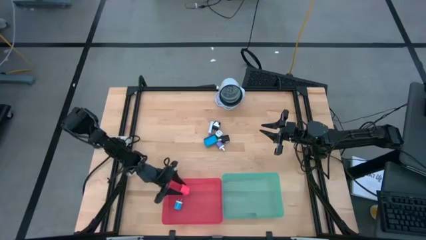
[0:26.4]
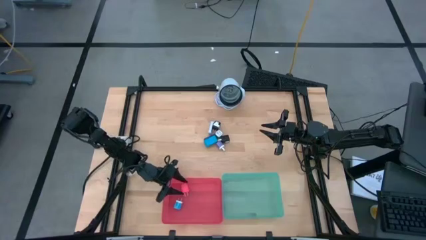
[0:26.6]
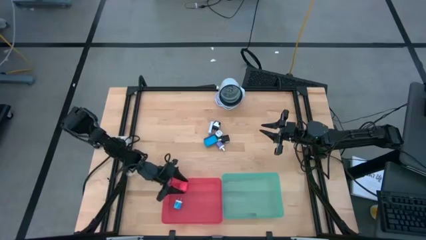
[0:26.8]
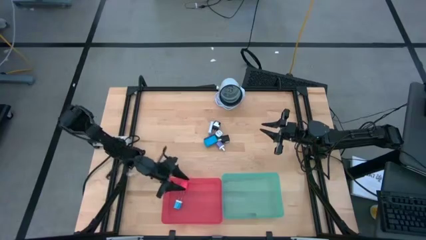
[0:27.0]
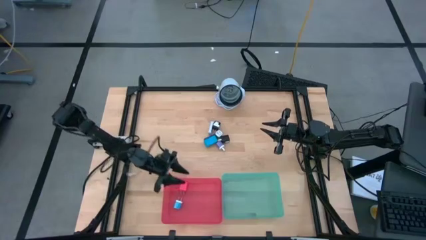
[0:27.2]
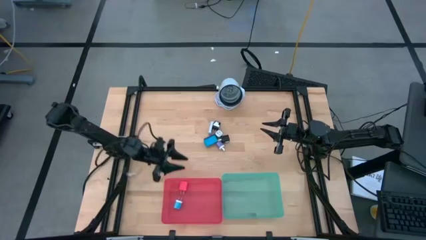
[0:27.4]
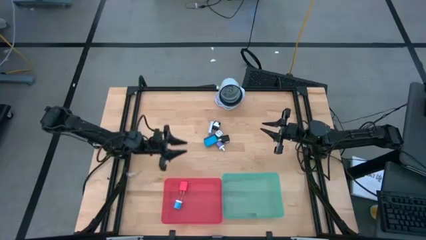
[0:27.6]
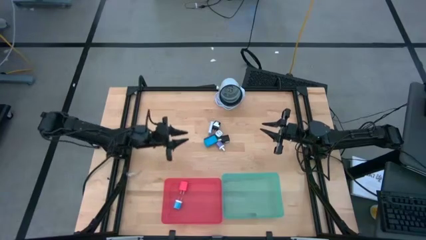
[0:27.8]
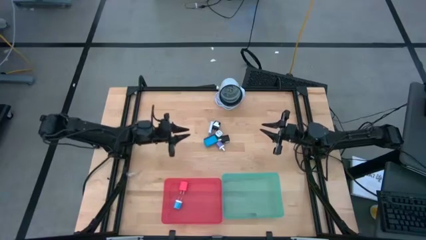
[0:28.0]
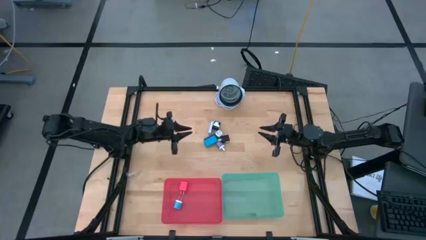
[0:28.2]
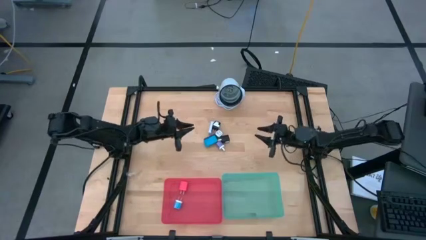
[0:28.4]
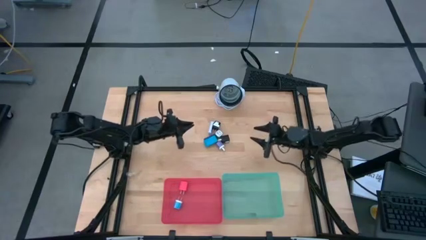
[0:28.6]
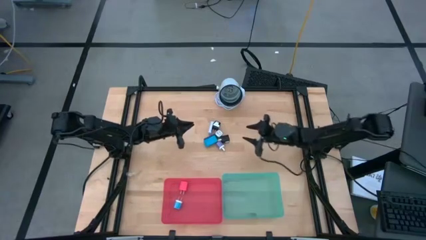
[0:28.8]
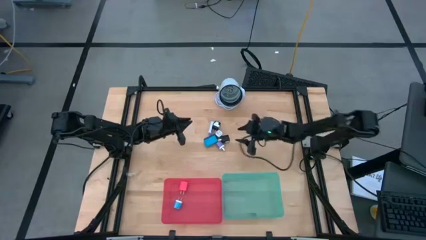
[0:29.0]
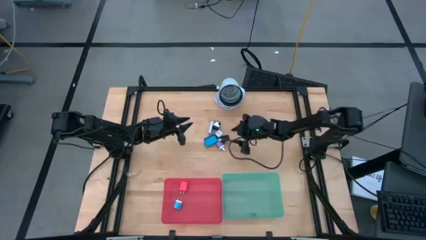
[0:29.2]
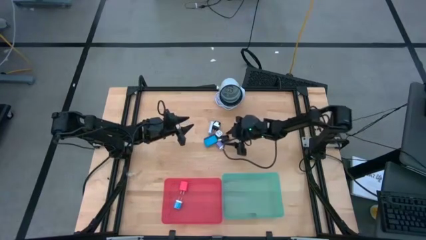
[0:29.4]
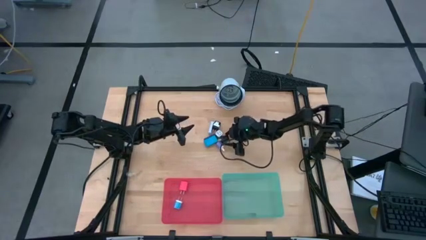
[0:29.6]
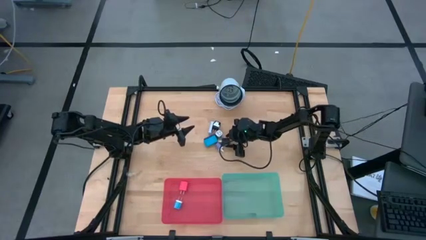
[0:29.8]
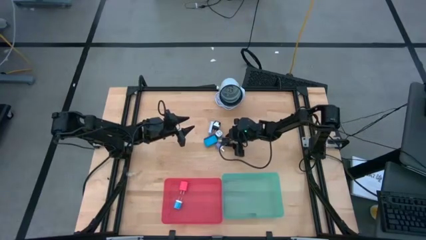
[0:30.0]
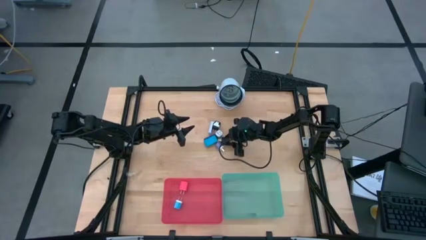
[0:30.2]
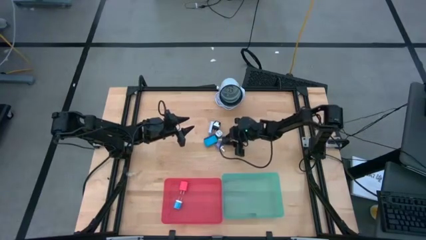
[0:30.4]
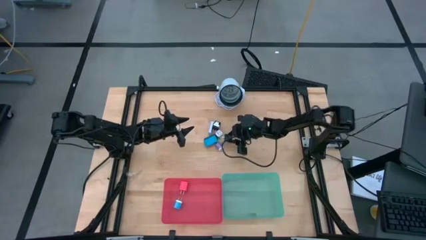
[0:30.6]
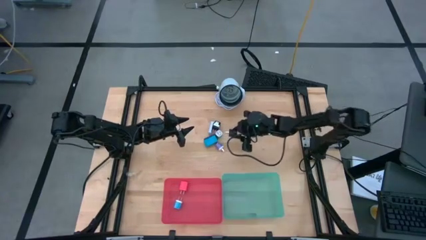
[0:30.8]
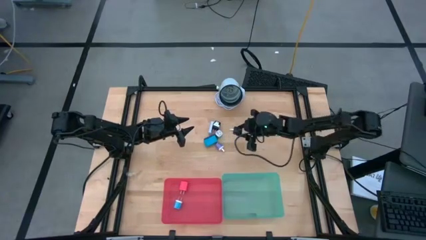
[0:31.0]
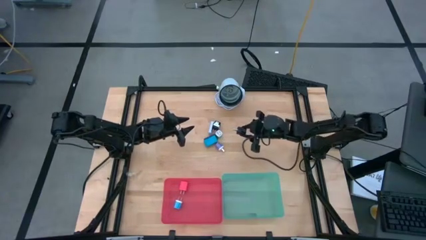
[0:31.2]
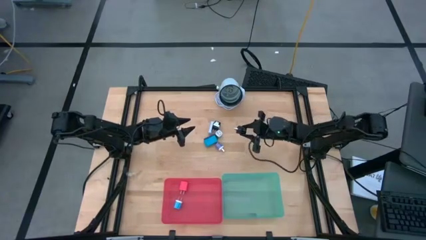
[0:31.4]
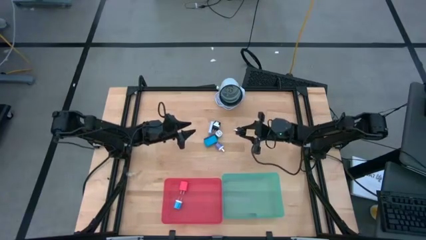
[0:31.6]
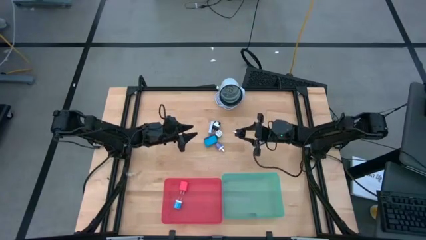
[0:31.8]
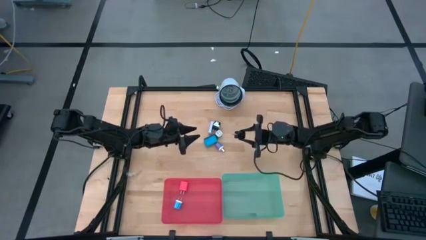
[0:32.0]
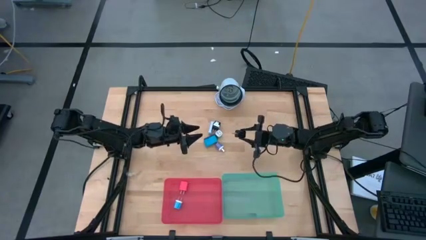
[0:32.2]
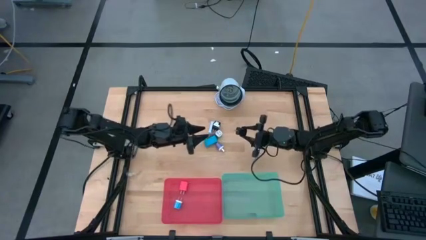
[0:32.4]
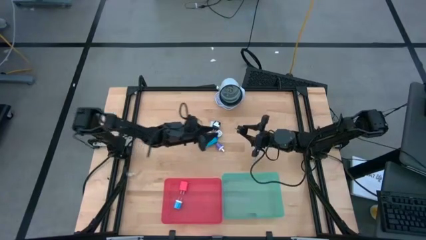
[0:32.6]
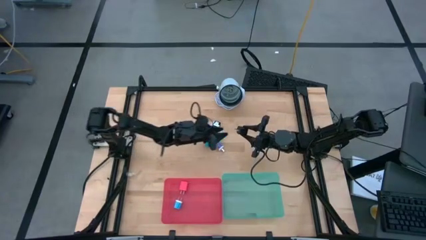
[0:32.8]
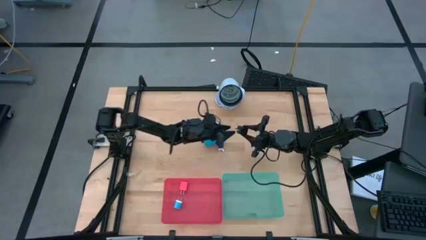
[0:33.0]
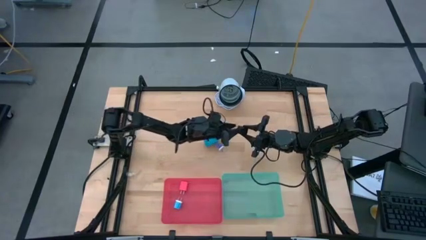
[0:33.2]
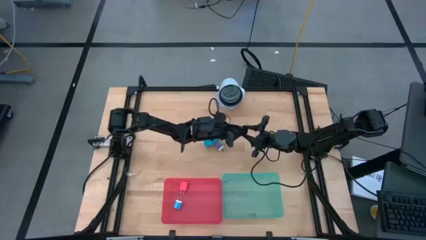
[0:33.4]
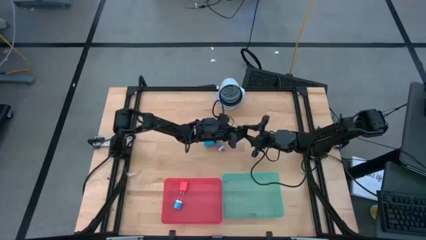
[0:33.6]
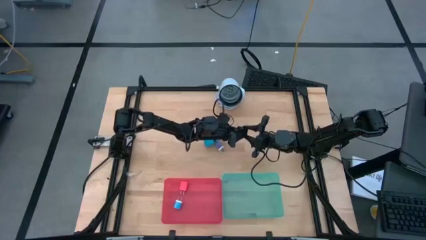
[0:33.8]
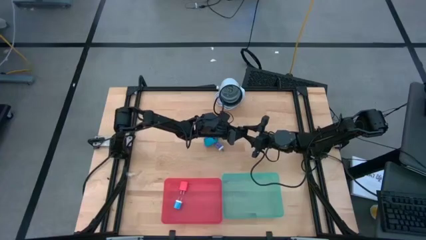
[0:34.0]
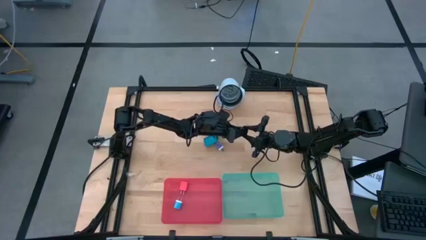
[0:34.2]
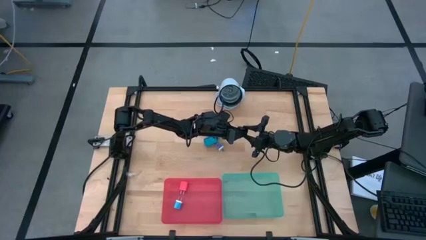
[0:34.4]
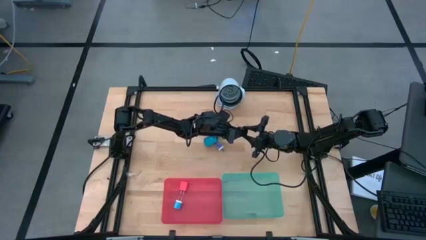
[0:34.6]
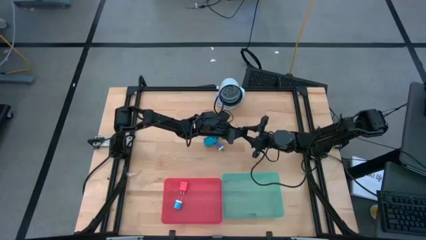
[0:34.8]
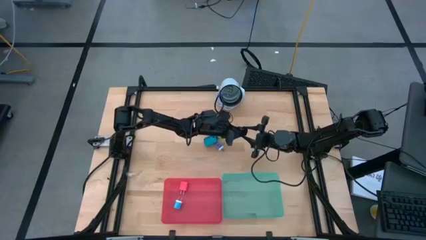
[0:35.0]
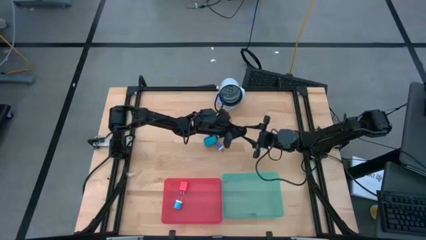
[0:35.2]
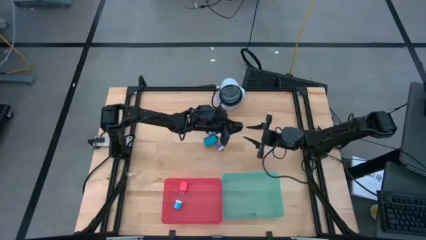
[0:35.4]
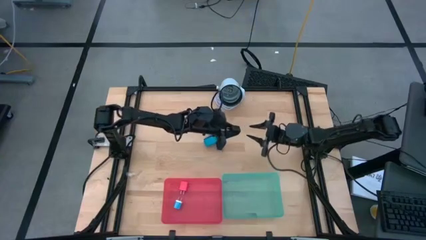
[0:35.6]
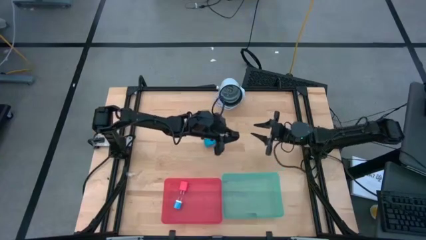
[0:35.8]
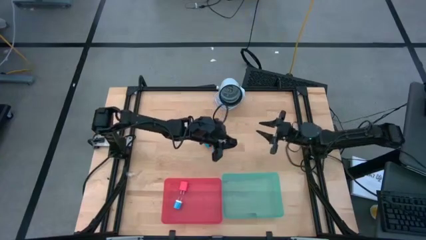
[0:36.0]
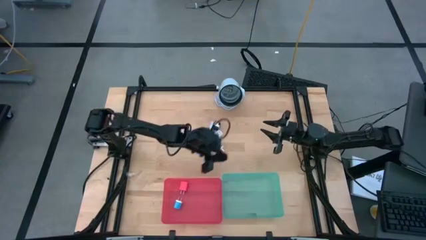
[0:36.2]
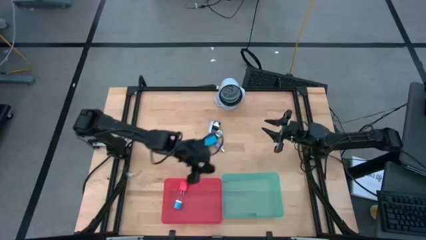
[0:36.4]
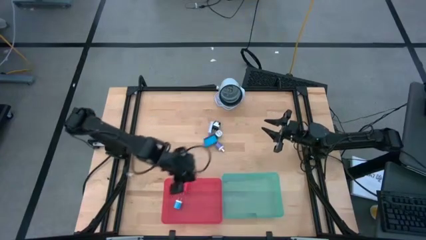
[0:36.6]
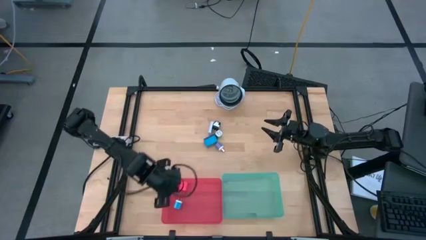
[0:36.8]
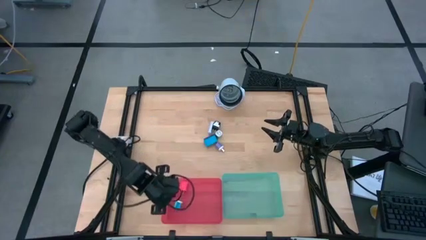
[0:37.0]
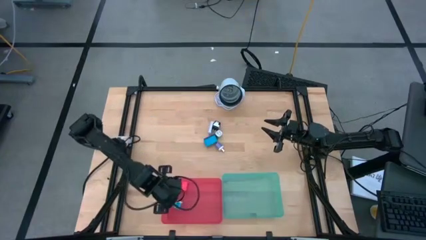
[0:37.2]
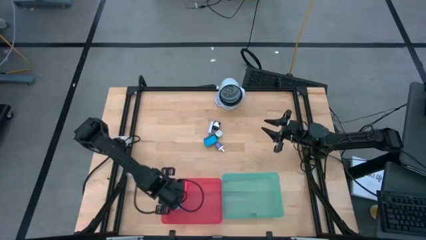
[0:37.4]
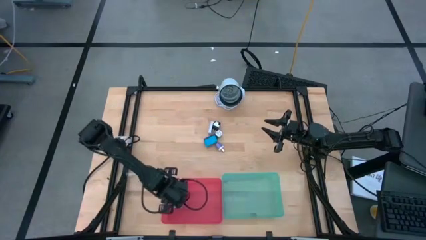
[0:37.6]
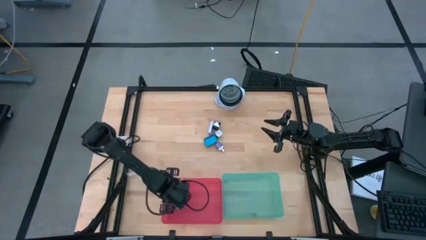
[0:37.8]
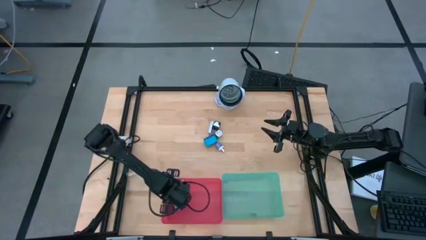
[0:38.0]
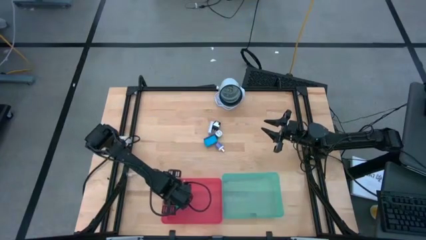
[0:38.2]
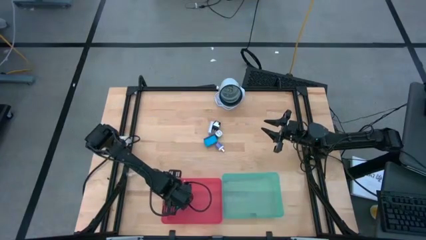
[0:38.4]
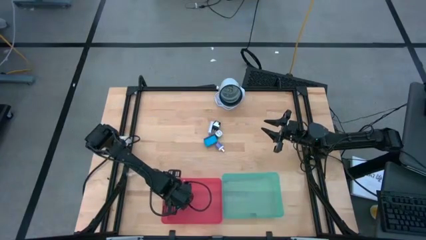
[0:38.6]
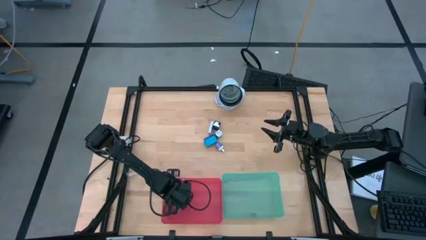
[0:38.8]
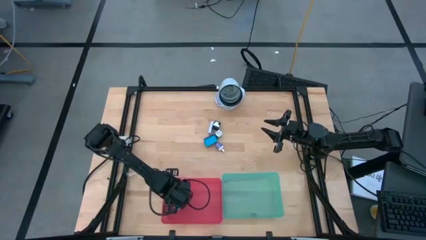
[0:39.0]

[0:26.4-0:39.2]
Task: Pick & Place Office items
Put the bottom black charger adapter into the red bin
